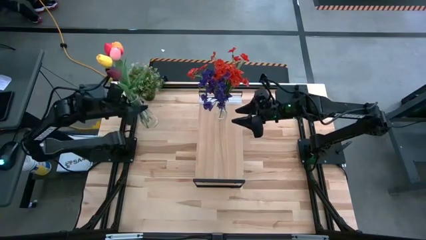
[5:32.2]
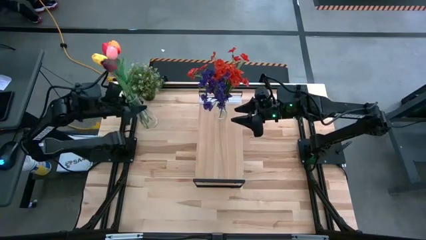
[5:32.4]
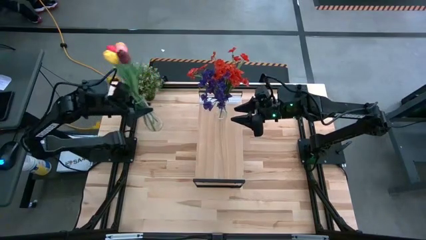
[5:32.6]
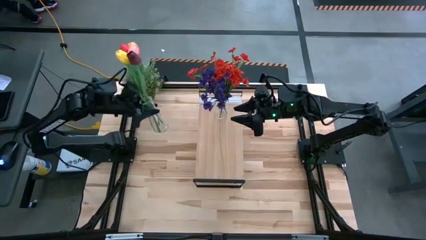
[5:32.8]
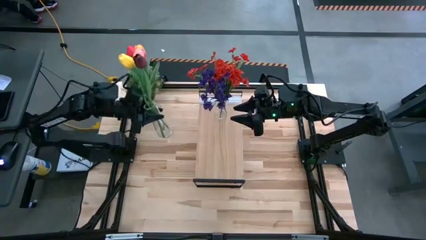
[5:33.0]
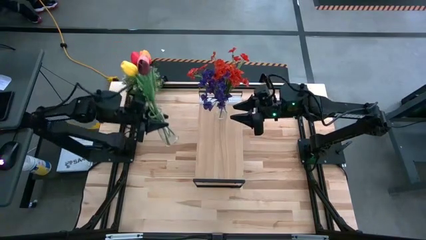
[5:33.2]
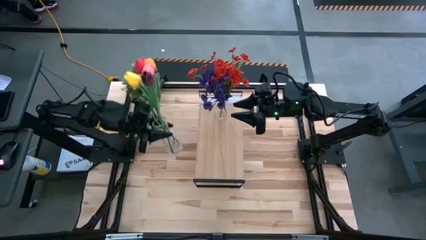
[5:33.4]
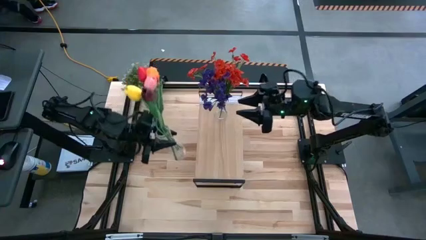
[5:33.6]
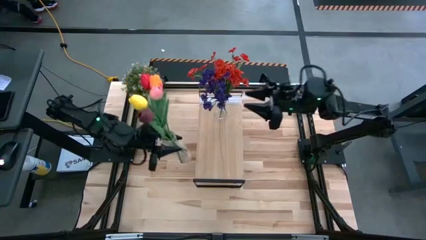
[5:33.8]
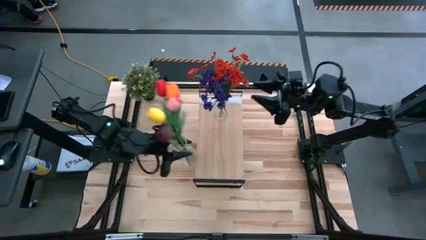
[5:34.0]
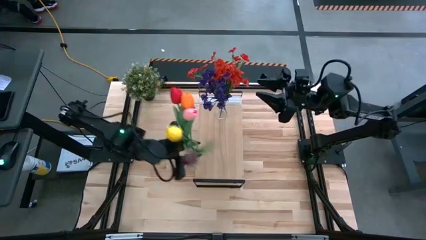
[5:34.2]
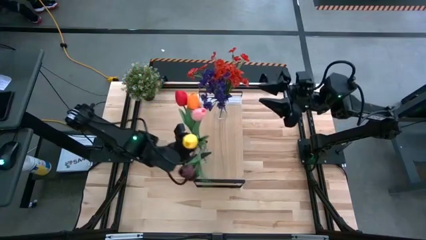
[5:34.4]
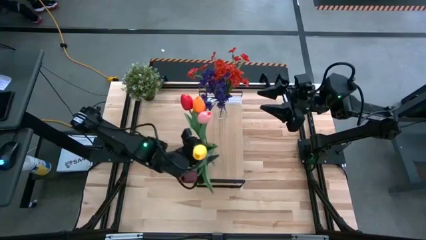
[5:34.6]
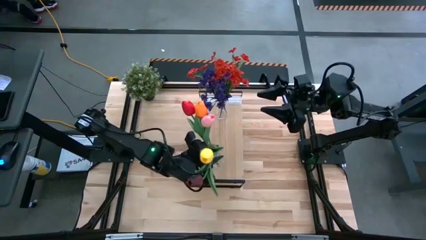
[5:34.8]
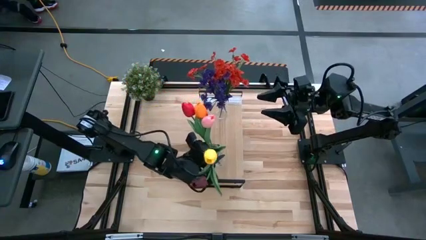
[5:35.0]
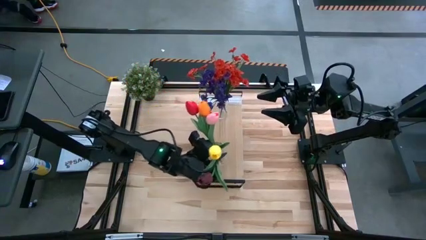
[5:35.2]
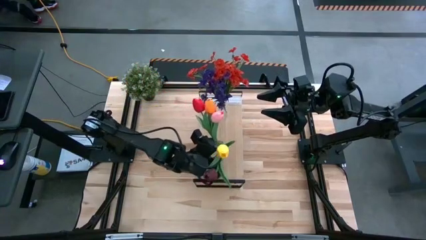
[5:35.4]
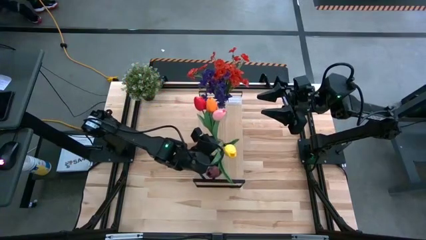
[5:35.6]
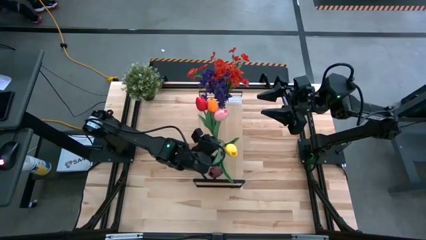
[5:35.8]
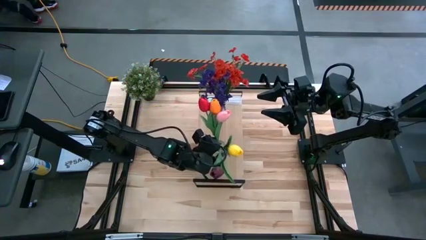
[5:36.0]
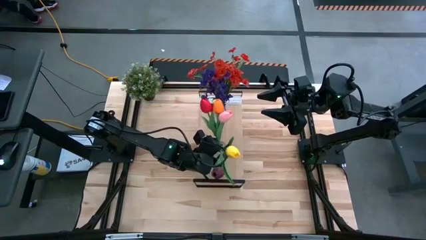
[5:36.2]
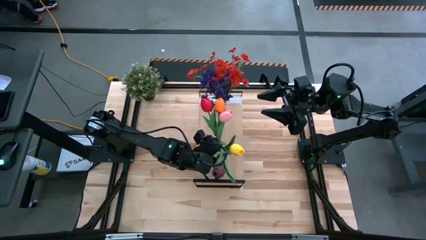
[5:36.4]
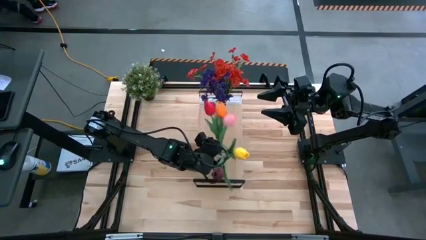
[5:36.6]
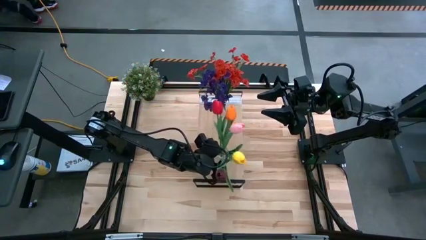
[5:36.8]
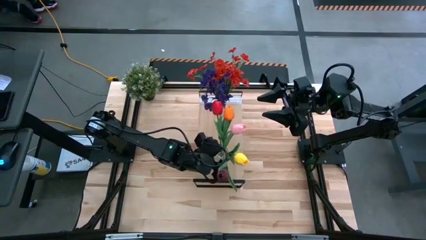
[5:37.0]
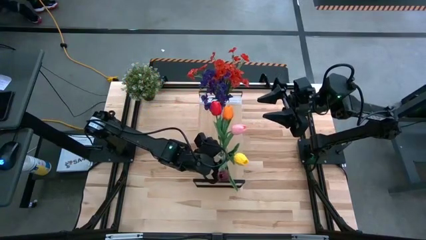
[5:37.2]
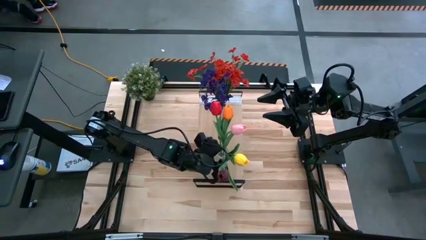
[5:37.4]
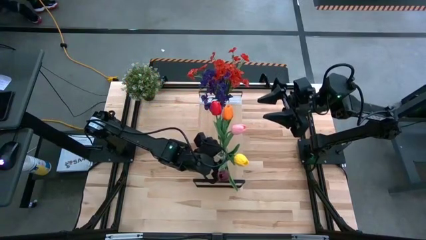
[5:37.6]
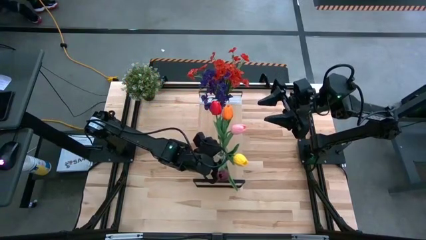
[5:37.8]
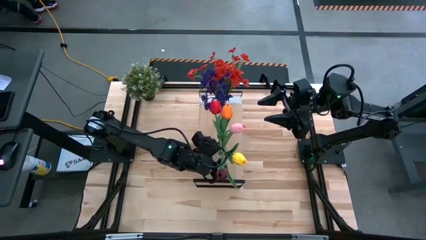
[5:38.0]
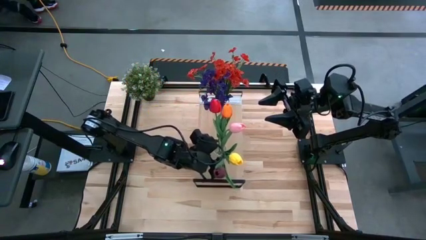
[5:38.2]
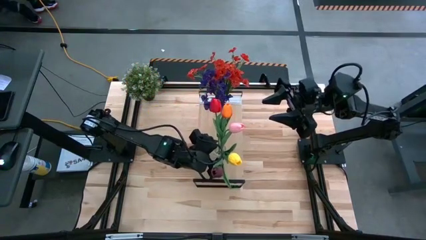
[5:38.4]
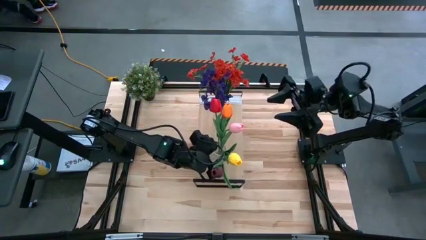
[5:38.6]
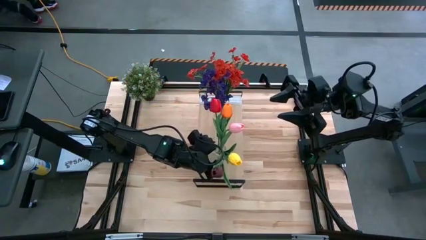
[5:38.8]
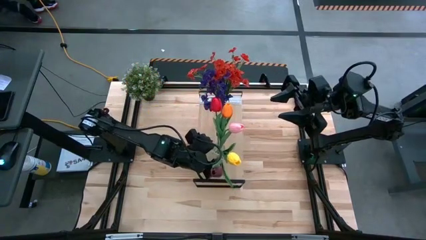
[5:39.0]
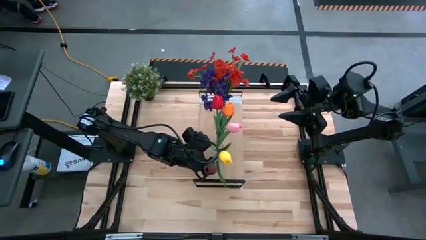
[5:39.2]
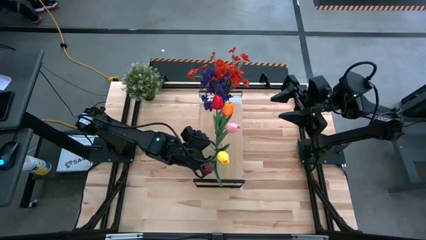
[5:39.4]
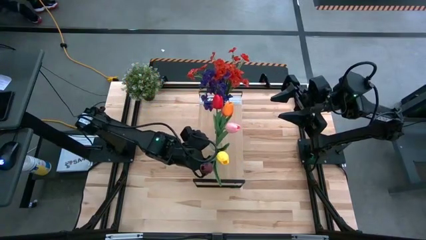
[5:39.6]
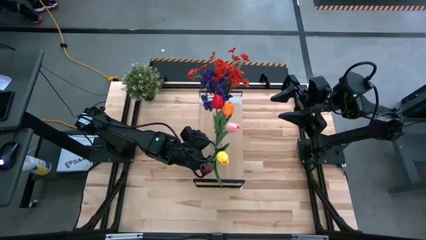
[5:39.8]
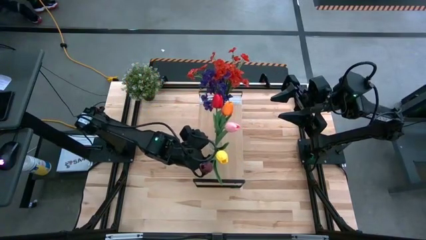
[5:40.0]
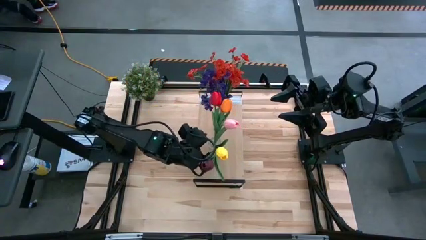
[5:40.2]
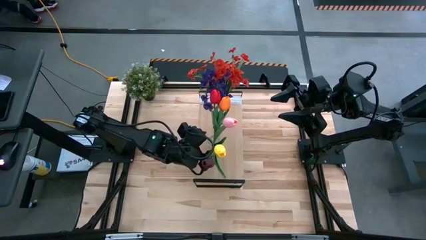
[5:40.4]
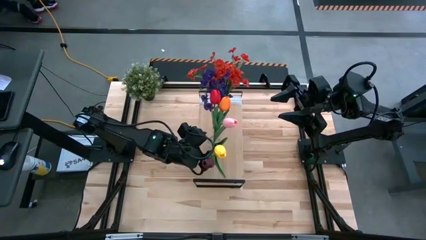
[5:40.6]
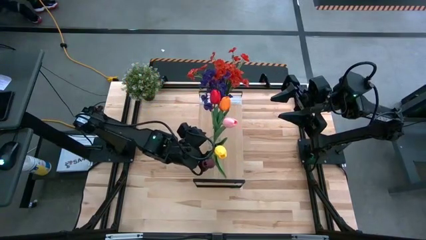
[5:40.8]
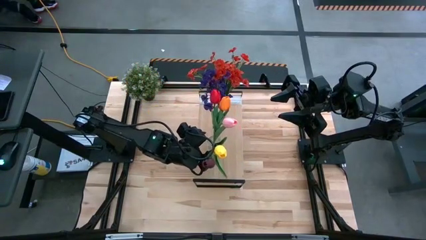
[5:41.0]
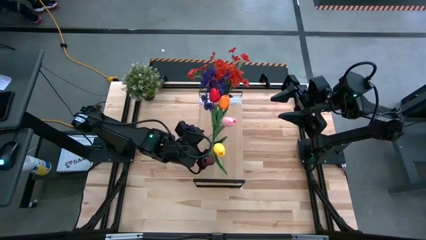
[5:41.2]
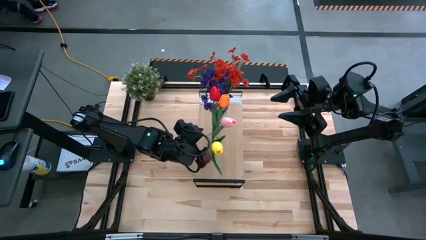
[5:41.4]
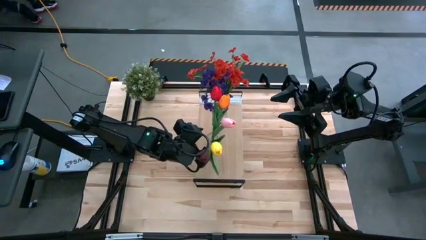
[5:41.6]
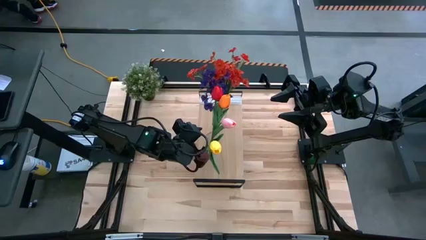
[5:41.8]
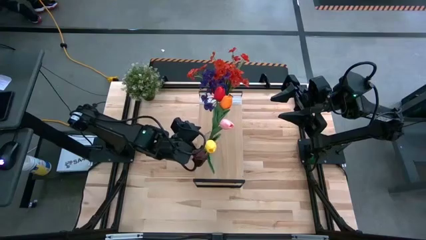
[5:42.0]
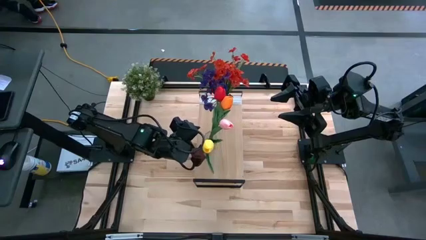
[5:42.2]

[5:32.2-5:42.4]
Task: Pick and place flowers into a vace then onto a shelf
Put the transparent vase on the shelf

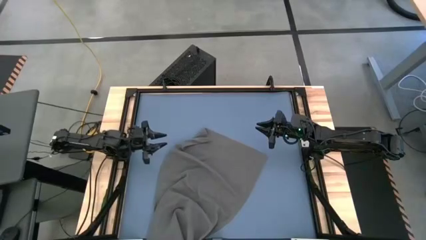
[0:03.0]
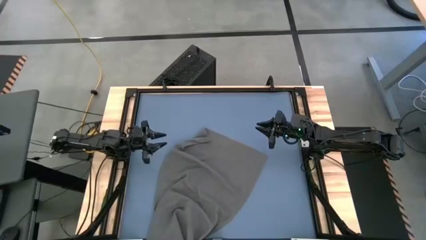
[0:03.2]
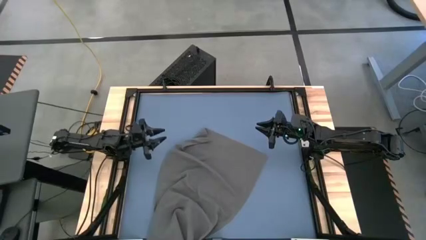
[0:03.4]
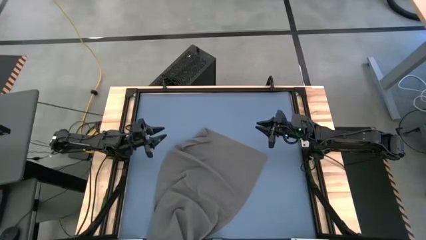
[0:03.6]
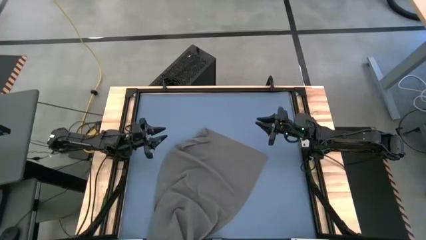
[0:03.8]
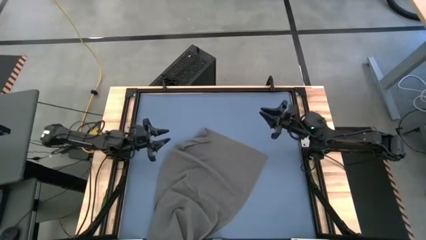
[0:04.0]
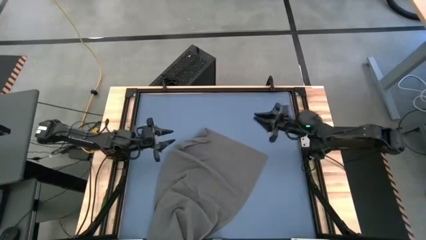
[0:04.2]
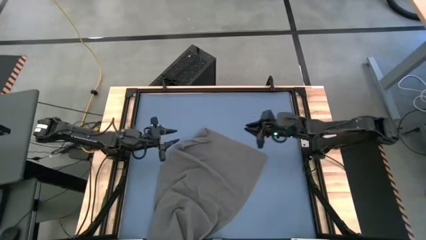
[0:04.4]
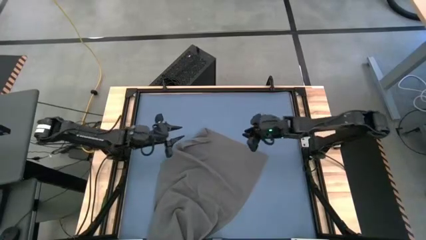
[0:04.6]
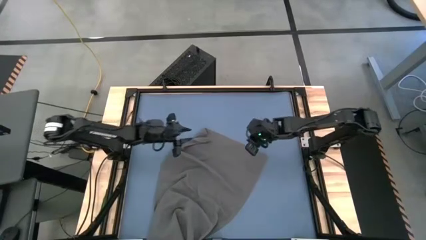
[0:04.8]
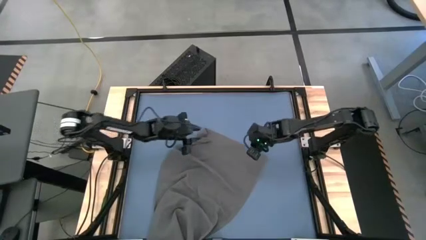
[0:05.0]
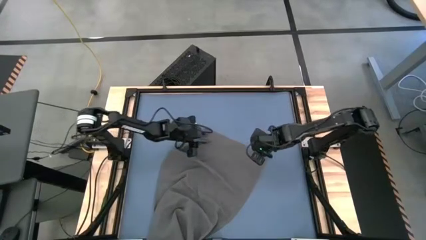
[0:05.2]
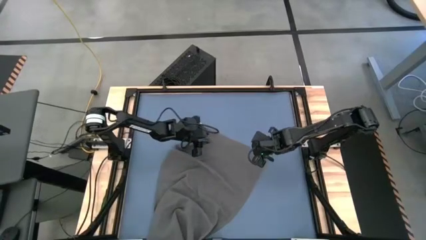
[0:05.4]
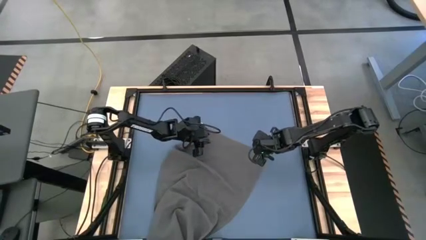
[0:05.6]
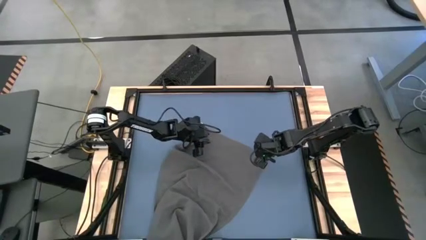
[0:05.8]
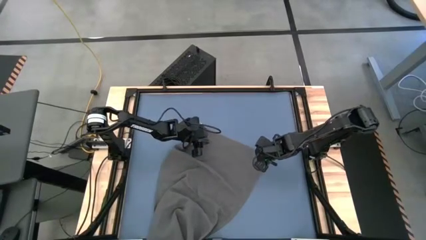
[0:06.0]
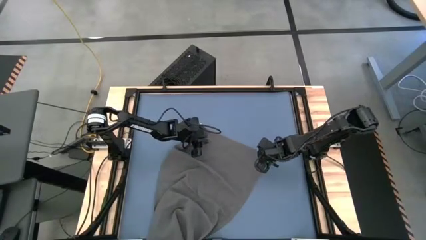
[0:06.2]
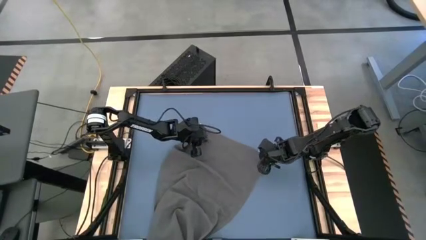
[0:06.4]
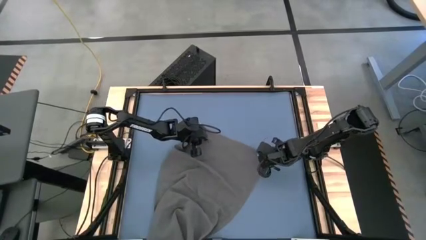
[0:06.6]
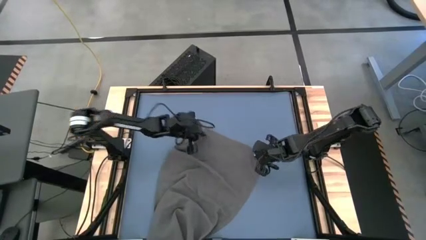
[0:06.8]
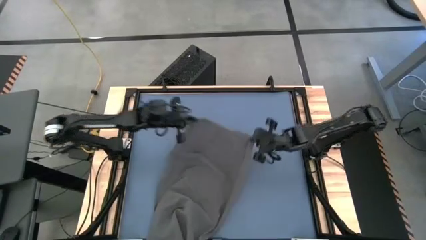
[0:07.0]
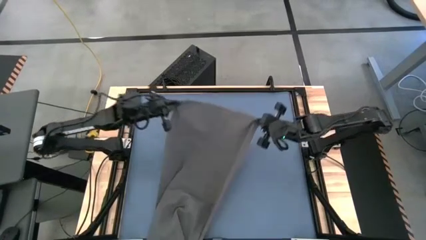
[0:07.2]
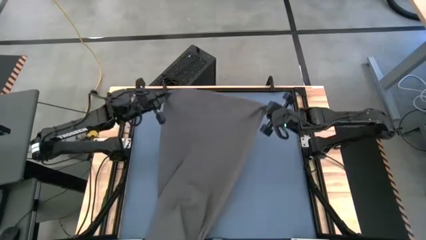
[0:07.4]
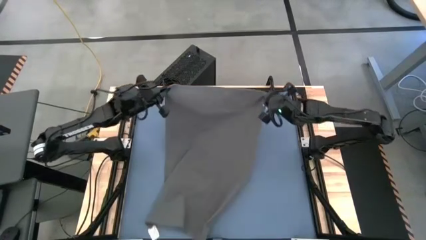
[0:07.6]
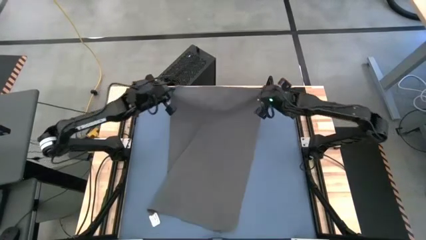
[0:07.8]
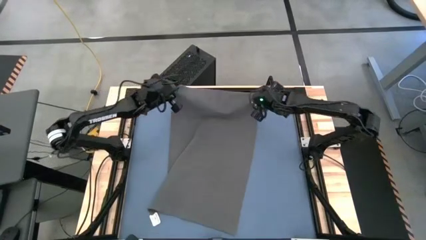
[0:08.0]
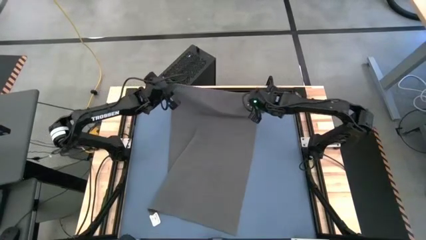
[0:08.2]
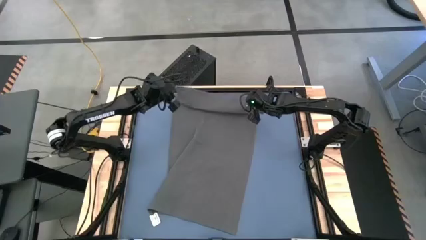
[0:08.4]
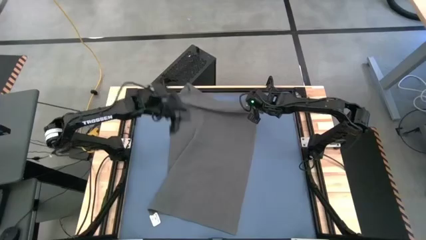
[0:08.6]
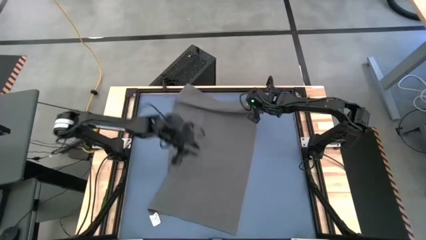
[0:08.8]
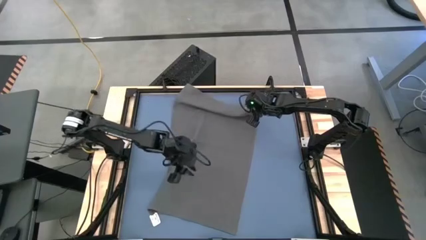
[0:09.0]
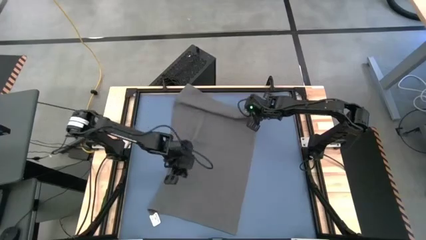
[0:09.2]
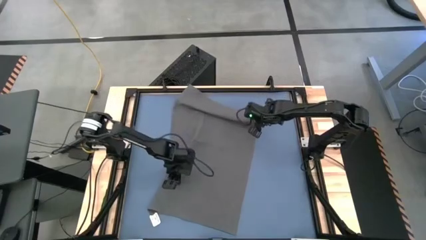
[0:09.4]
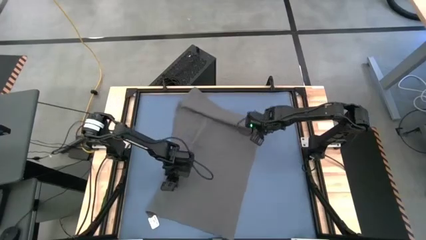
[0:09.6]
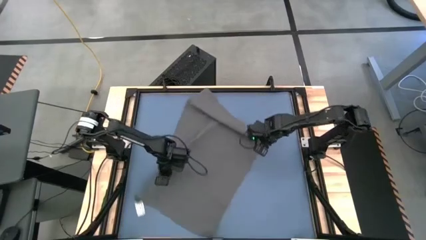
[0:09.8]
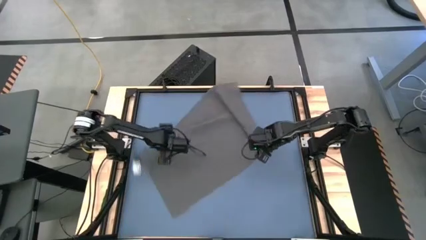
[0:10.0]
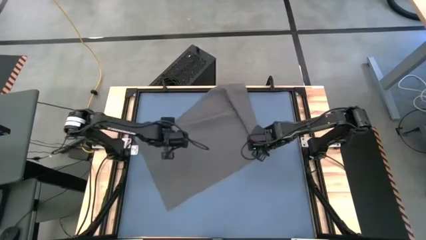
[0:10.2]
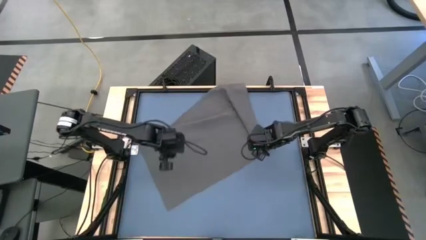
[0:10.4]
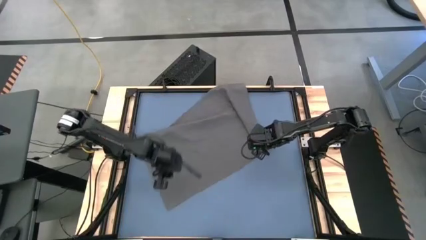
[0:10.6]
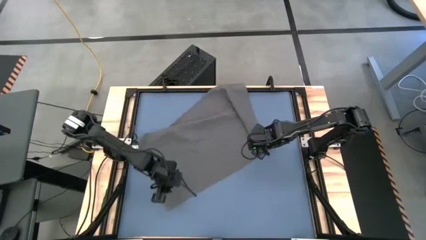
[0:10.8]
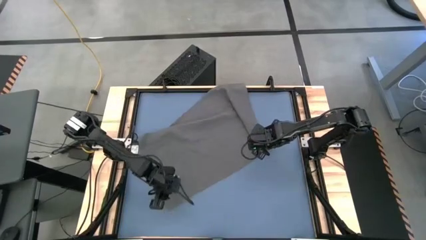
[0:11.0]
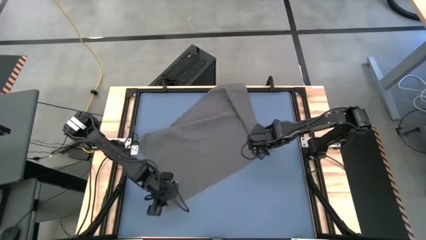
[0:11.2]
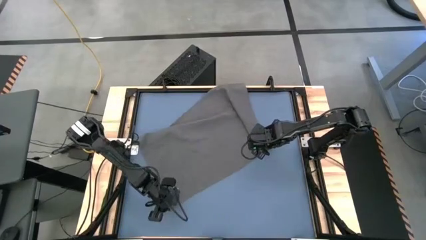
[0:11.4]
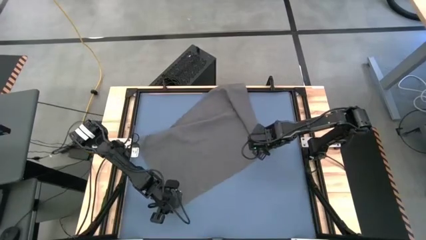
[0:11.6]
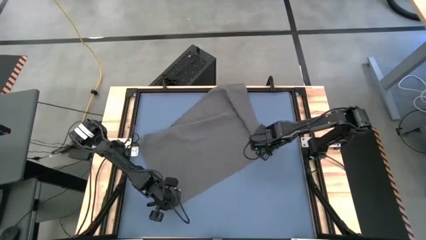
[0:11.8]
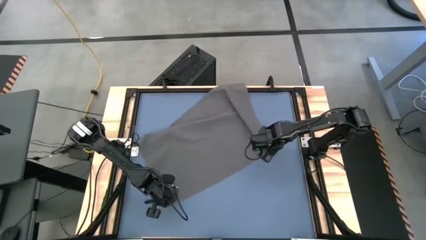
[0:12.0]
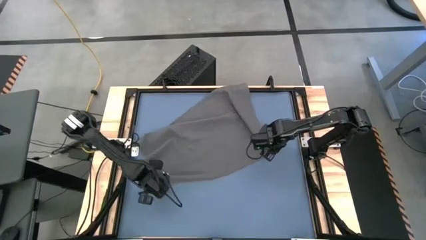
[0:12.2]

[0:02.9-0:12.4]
Task: Roll towel into tight, uniform cylinder
Roll the gray towel
